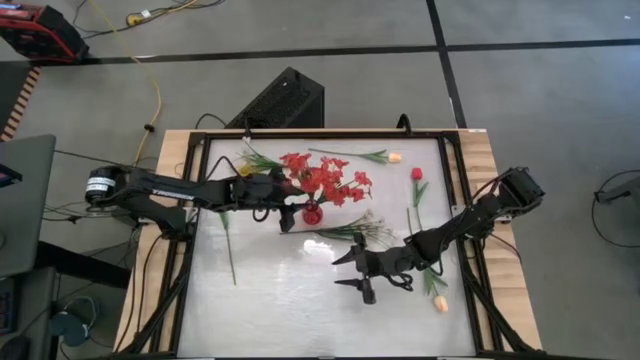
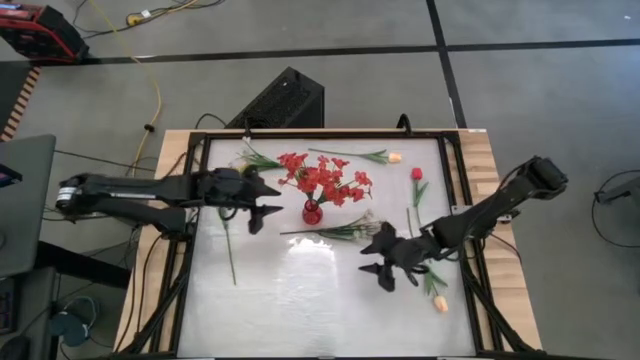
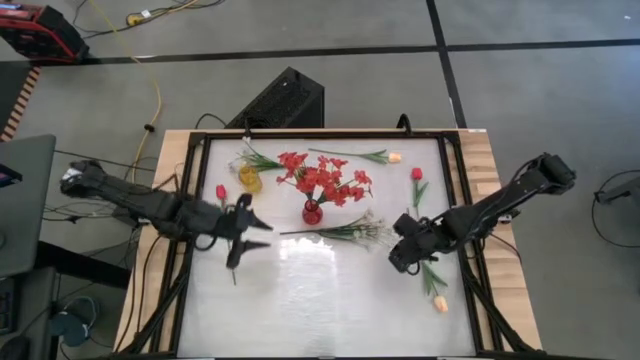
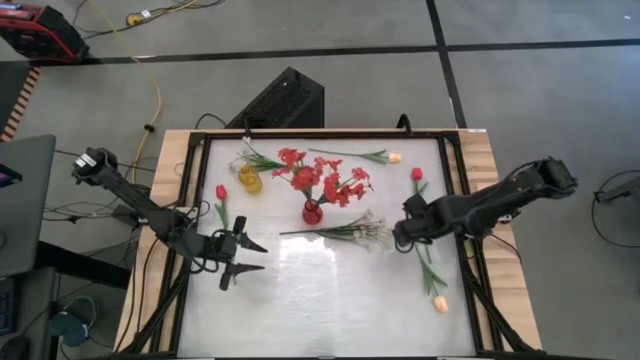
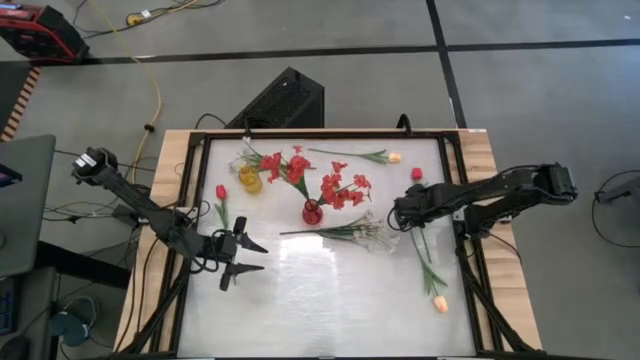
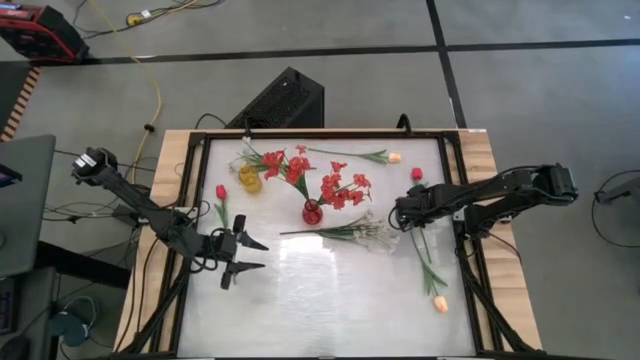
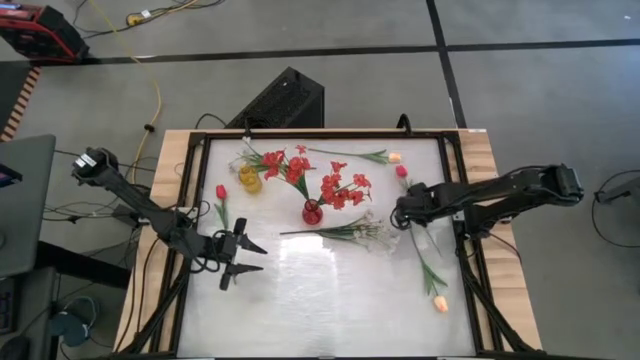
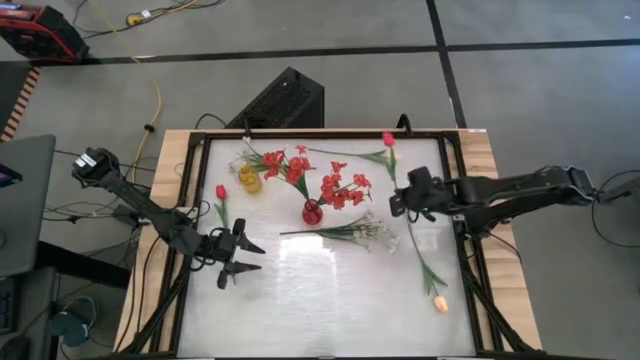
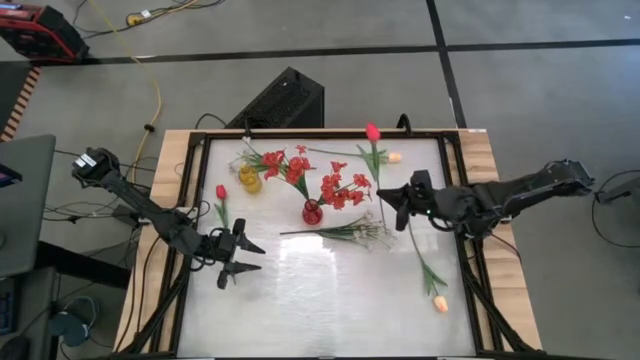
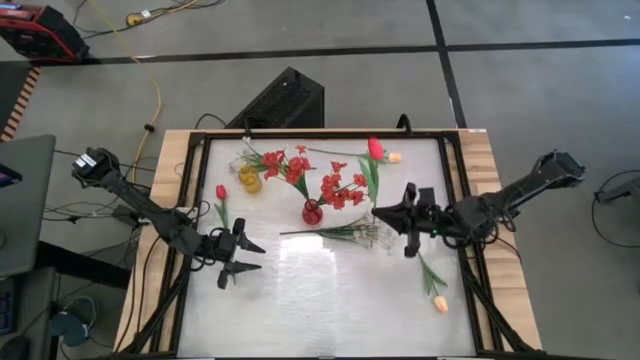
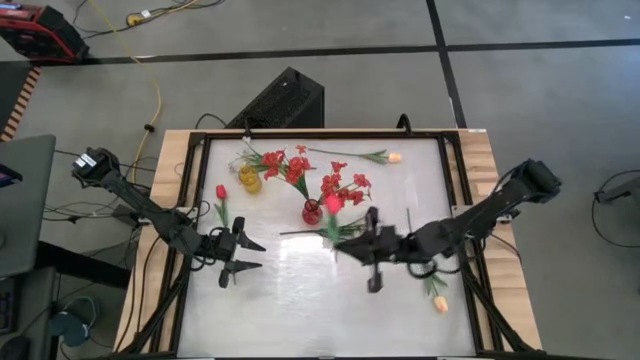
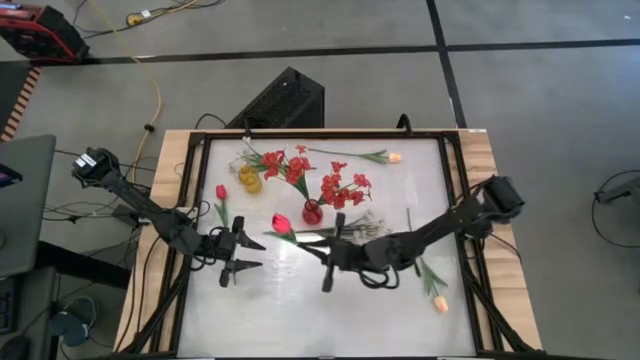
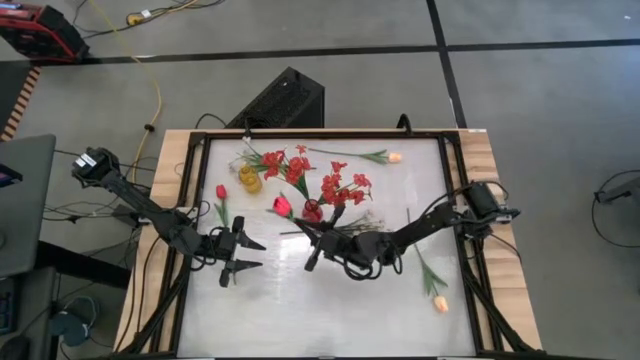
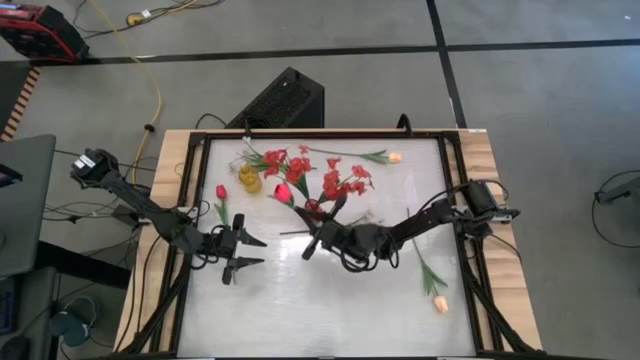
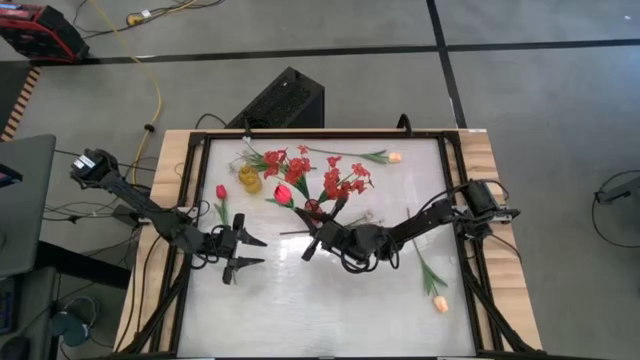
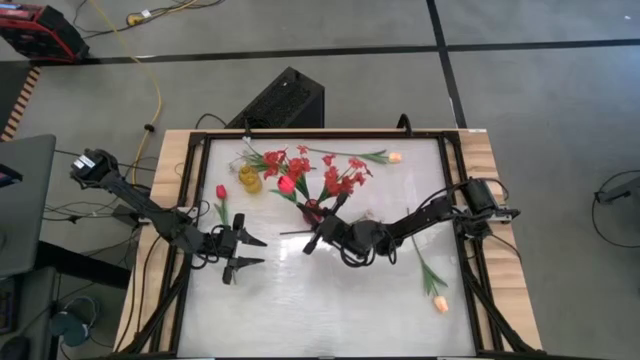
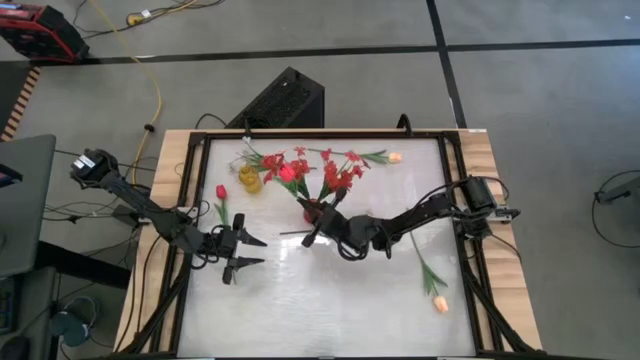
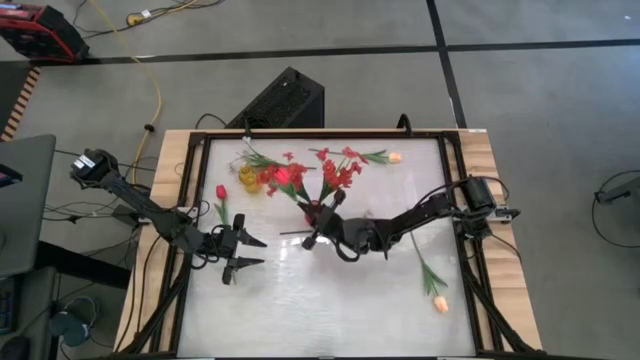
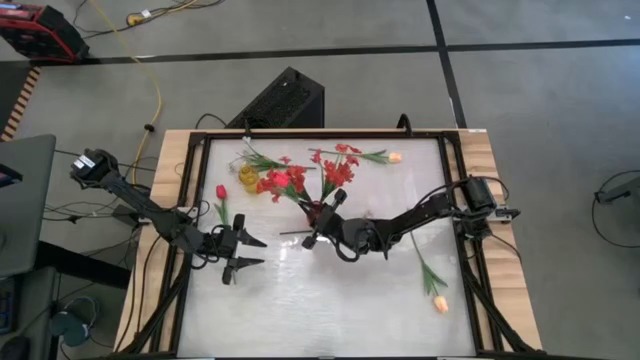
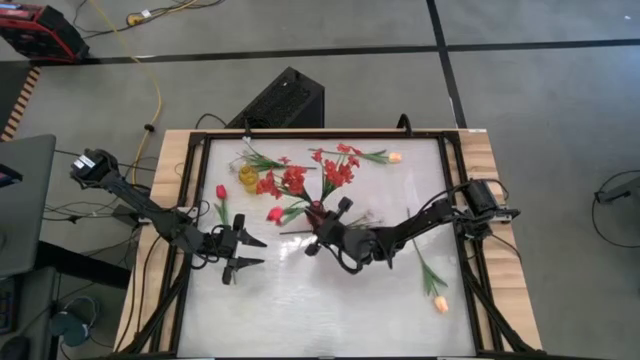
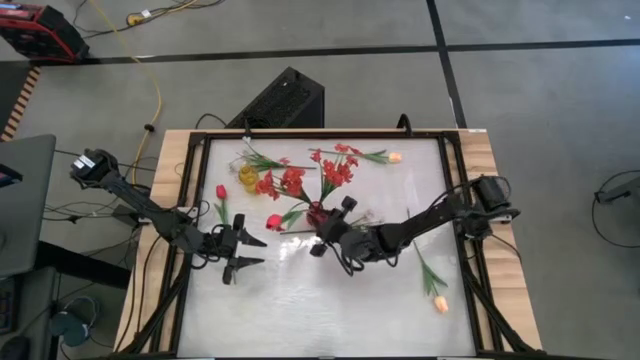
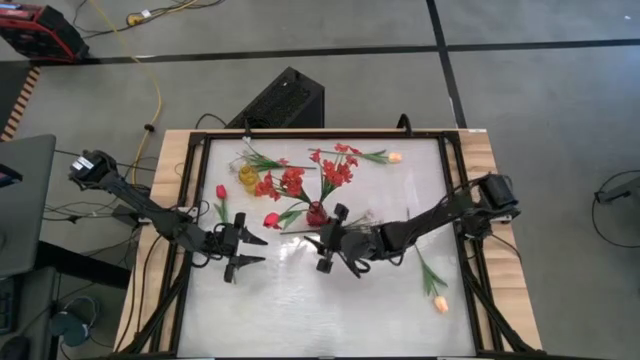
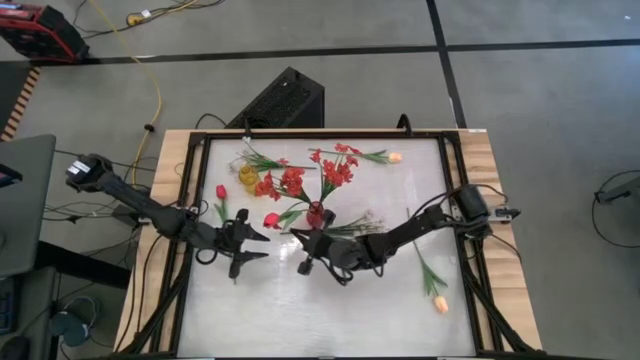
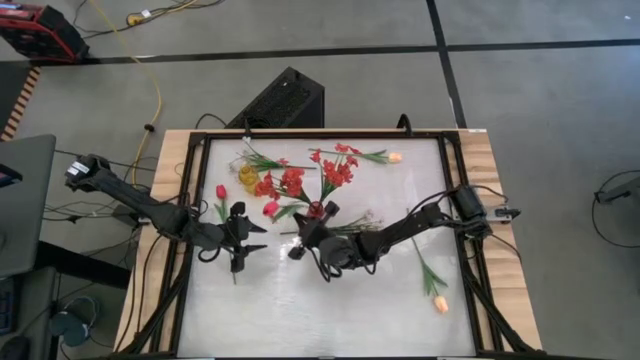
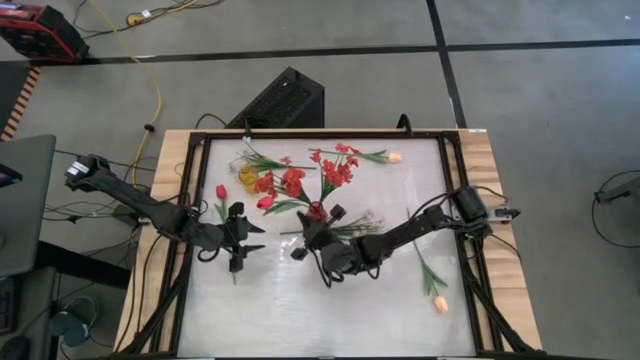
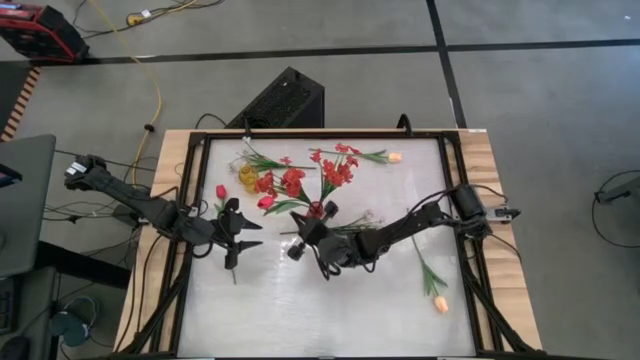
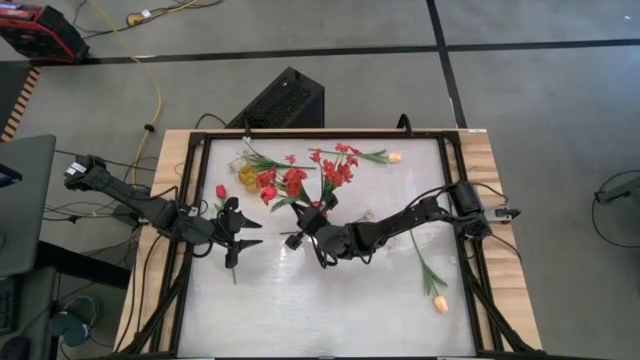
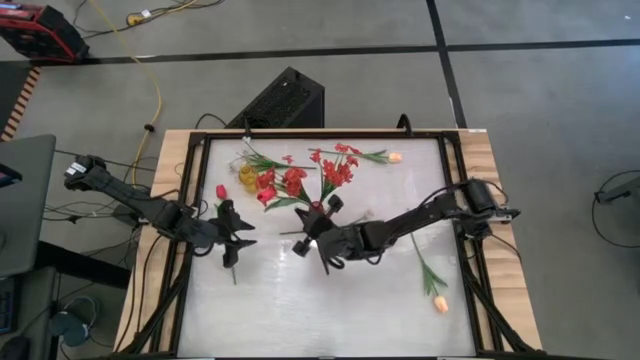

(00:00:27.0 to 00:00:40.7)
Task: Sort flowers into vase by color
Put the right pink tulip into the red vase

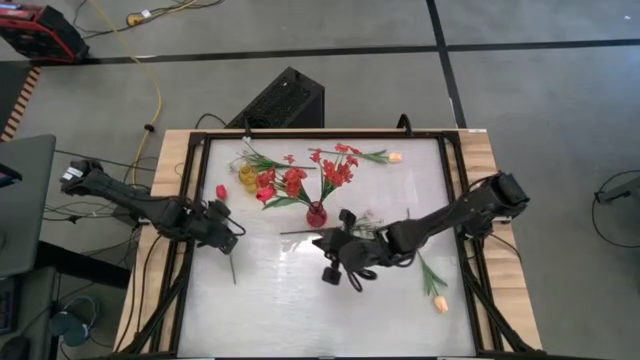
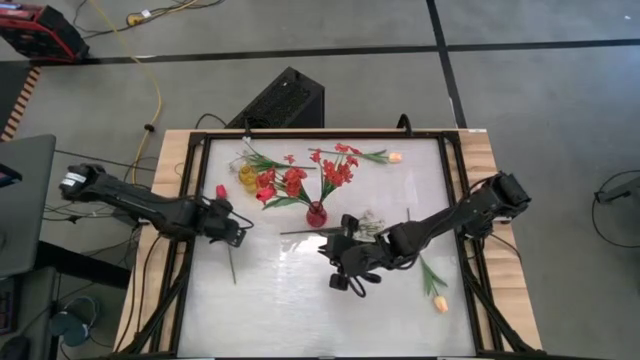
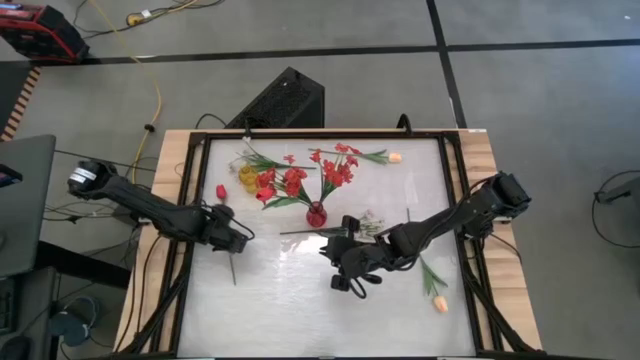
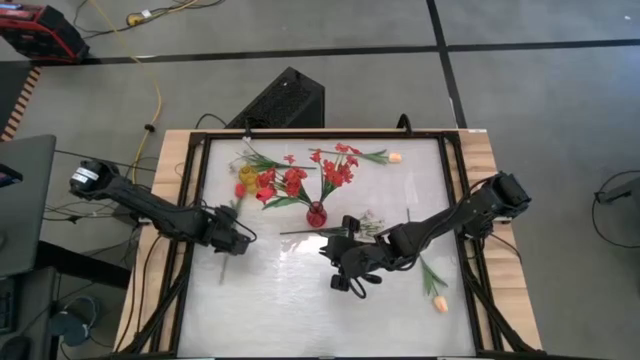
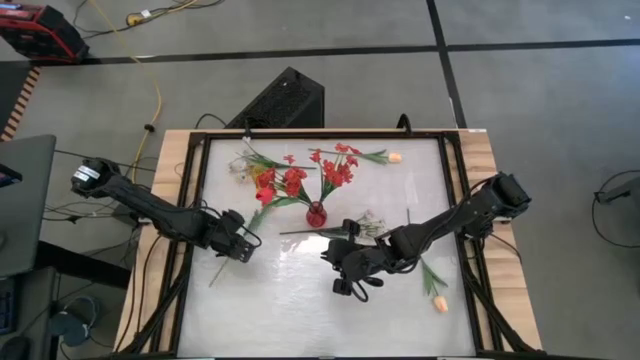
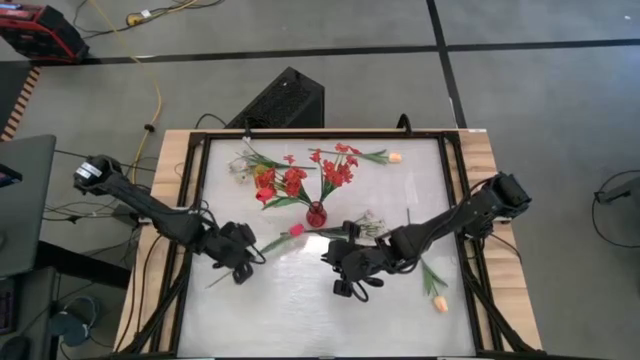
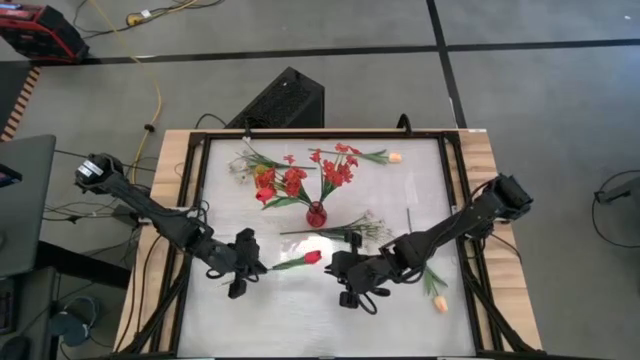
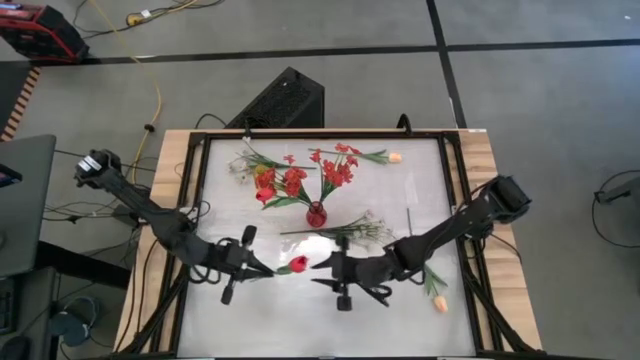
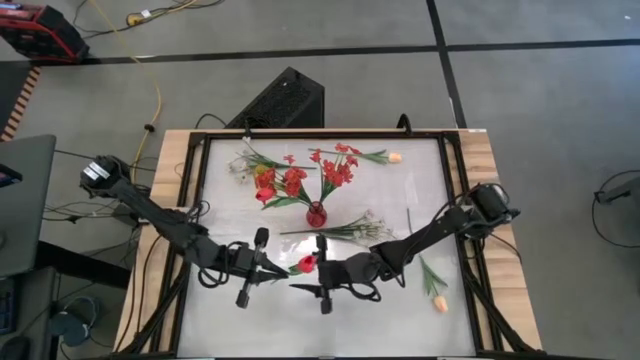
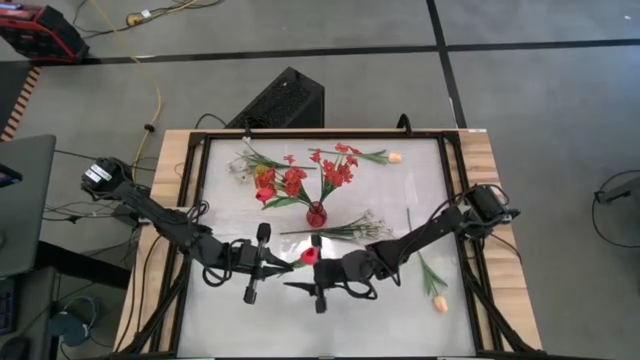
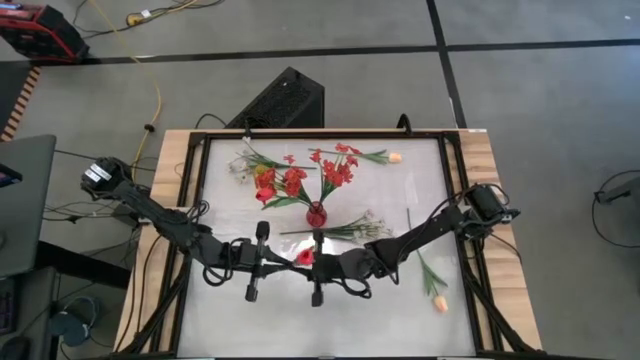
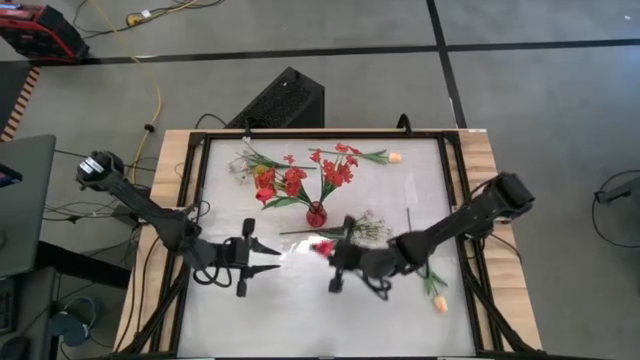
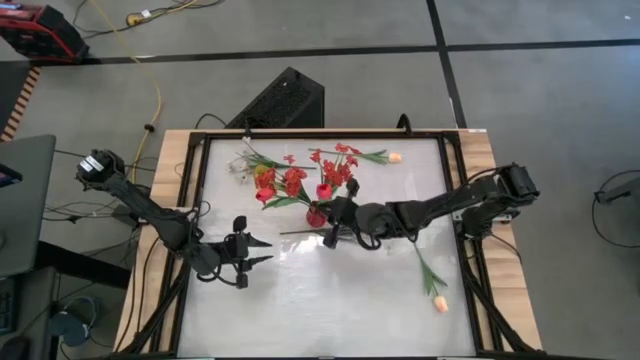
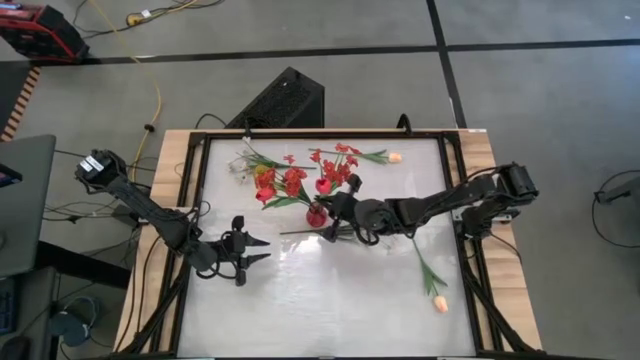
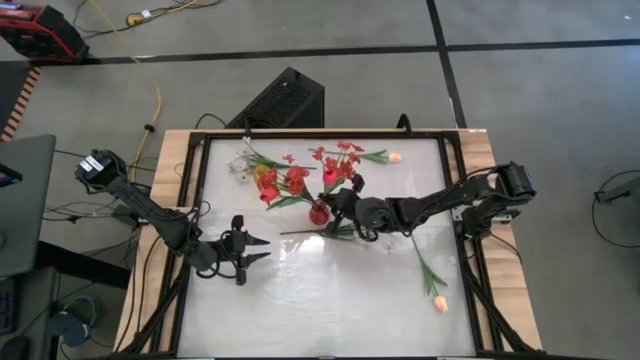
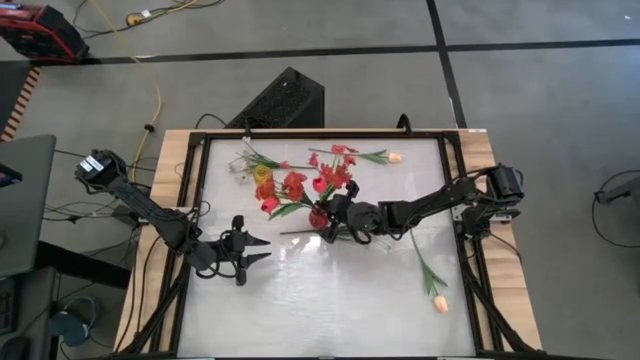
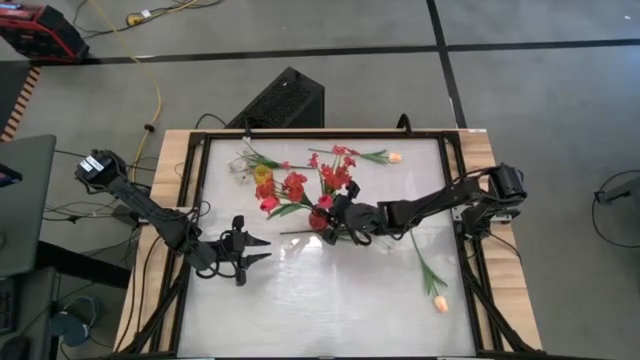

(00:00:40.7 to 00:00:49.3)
Put the pink tulip into the red vase
